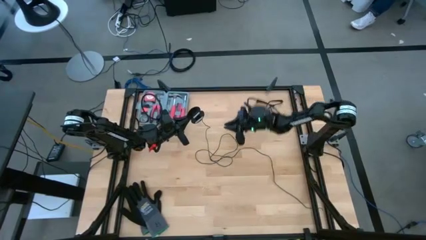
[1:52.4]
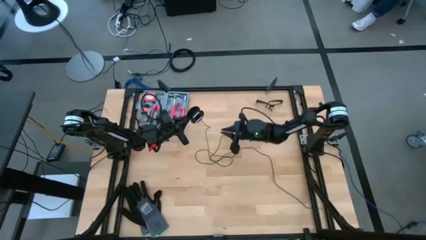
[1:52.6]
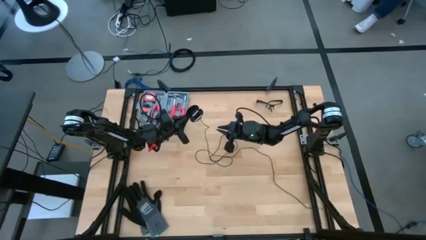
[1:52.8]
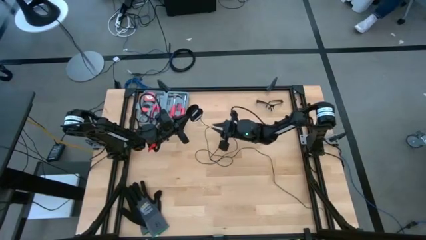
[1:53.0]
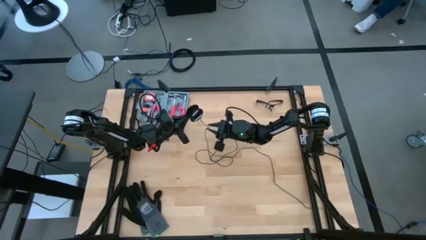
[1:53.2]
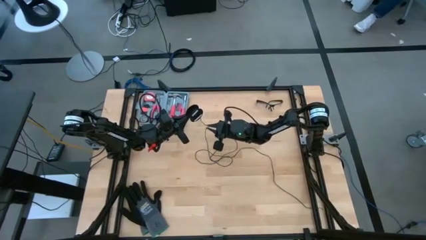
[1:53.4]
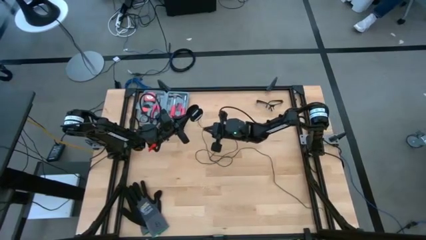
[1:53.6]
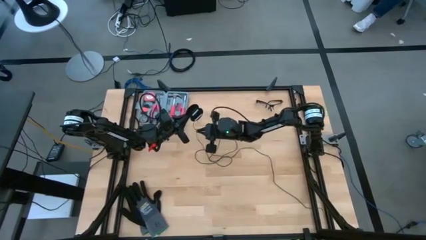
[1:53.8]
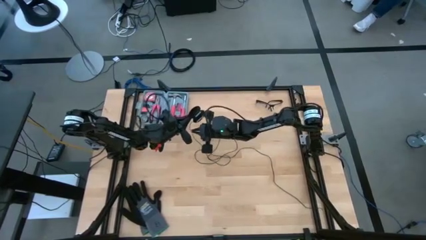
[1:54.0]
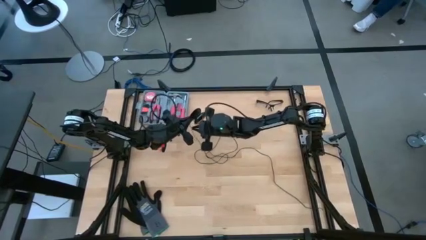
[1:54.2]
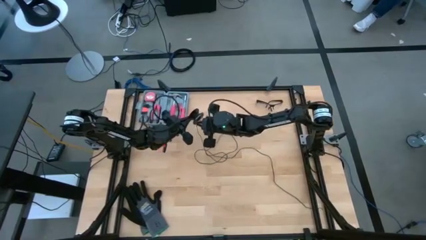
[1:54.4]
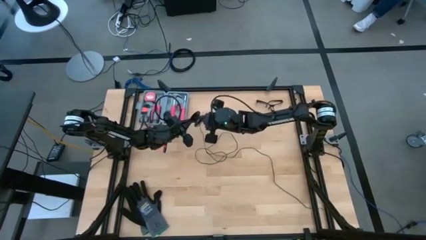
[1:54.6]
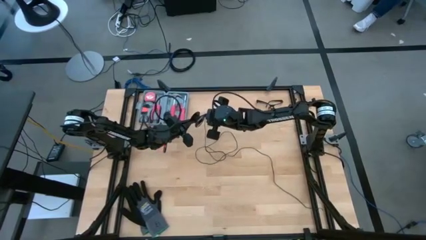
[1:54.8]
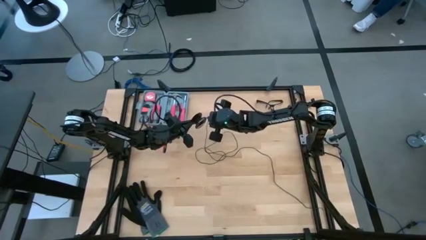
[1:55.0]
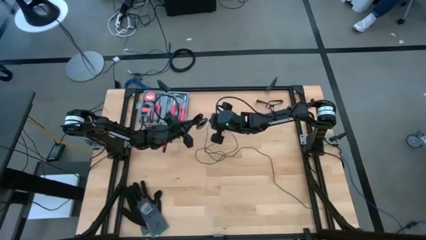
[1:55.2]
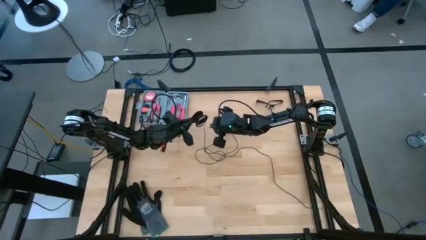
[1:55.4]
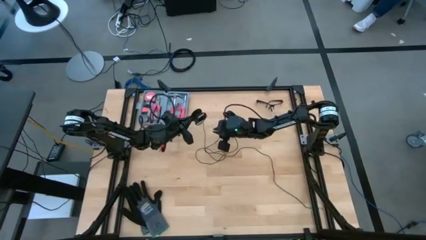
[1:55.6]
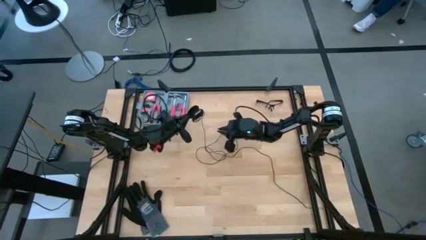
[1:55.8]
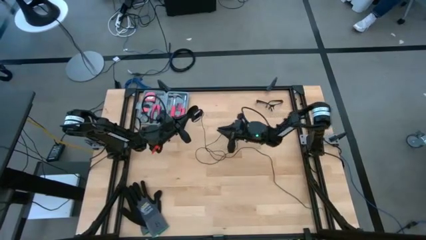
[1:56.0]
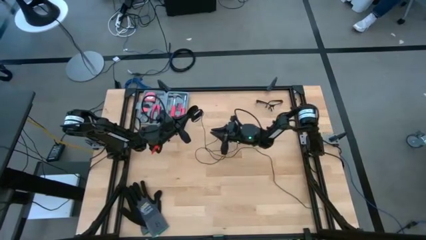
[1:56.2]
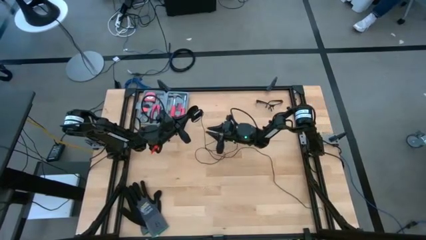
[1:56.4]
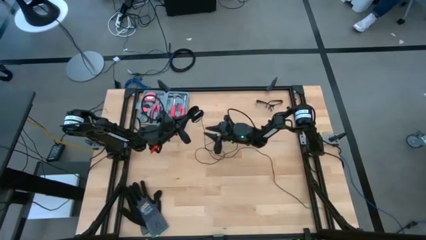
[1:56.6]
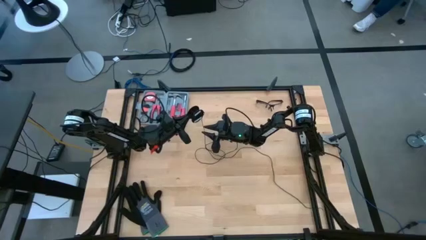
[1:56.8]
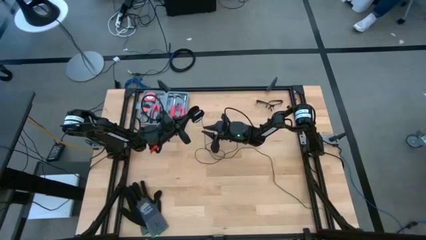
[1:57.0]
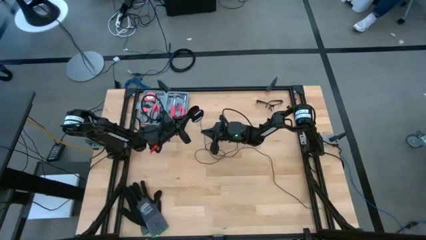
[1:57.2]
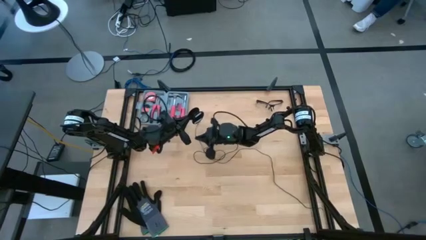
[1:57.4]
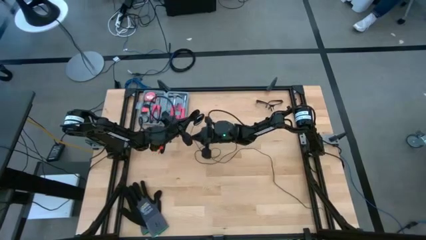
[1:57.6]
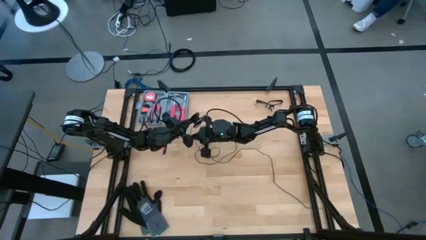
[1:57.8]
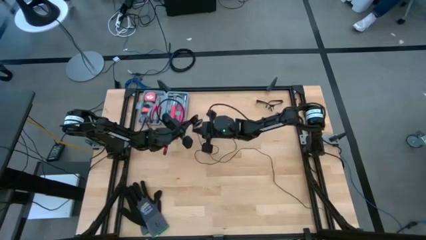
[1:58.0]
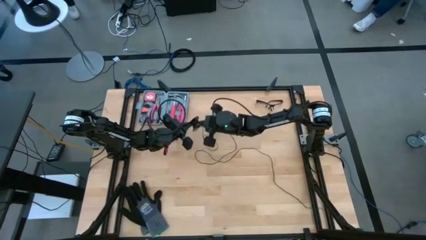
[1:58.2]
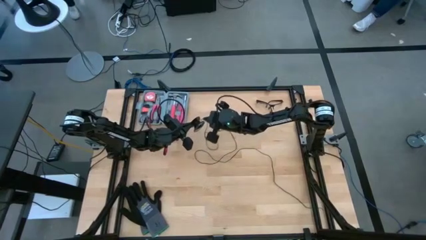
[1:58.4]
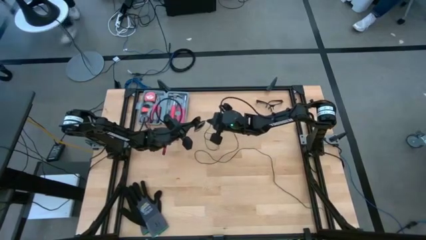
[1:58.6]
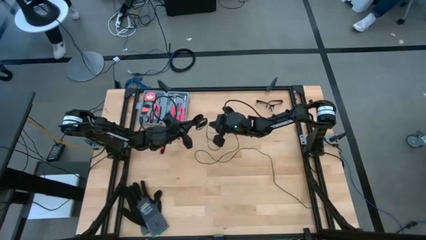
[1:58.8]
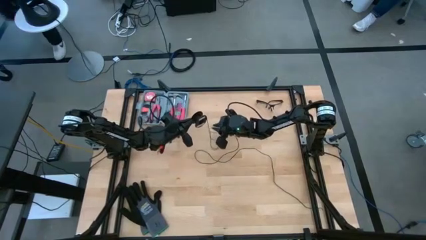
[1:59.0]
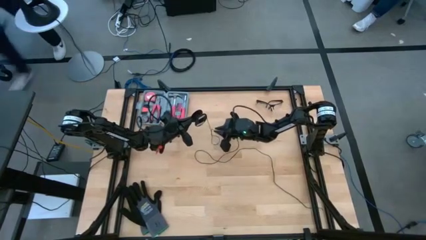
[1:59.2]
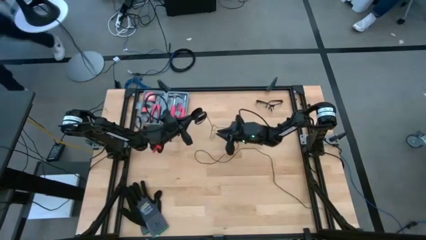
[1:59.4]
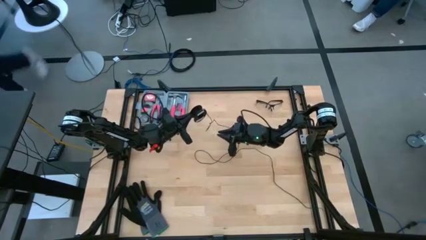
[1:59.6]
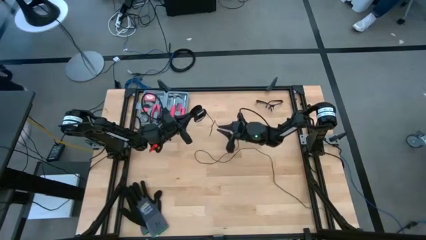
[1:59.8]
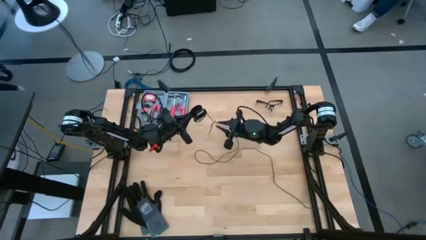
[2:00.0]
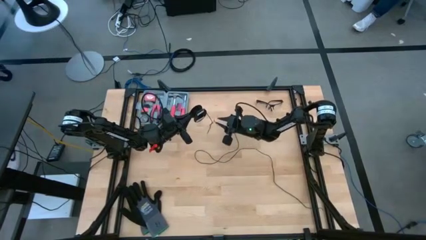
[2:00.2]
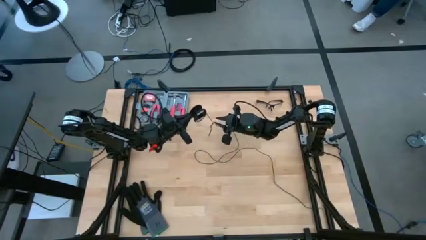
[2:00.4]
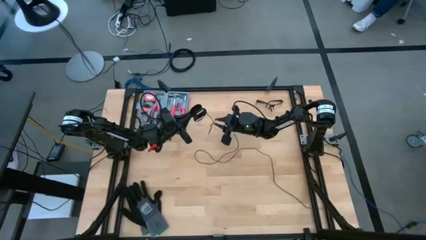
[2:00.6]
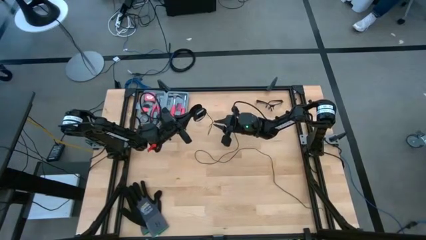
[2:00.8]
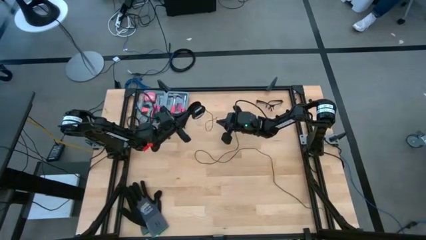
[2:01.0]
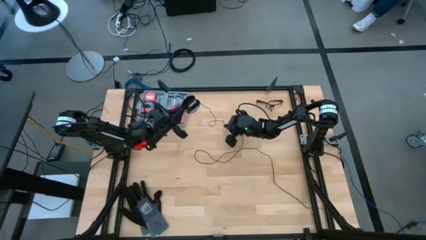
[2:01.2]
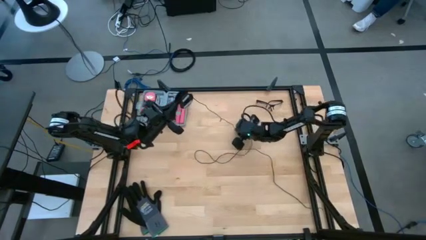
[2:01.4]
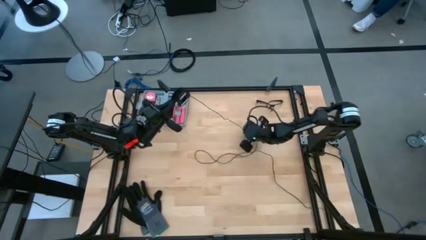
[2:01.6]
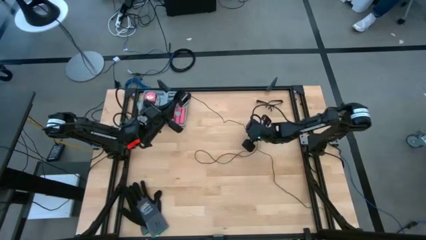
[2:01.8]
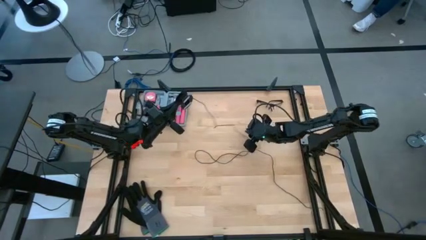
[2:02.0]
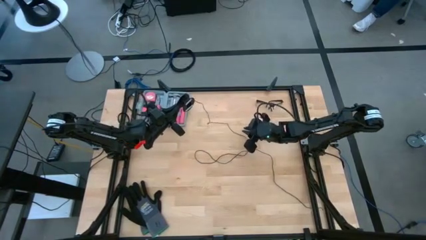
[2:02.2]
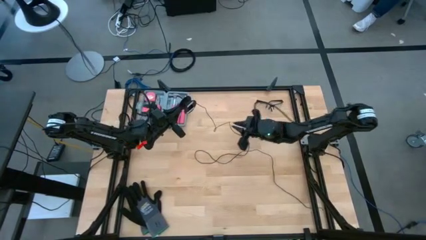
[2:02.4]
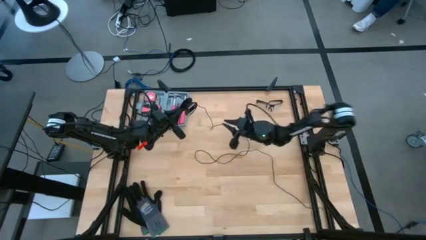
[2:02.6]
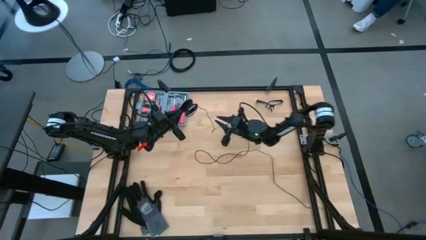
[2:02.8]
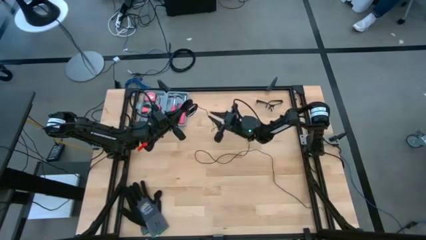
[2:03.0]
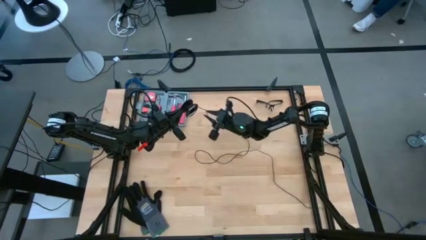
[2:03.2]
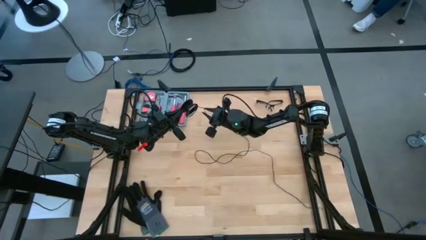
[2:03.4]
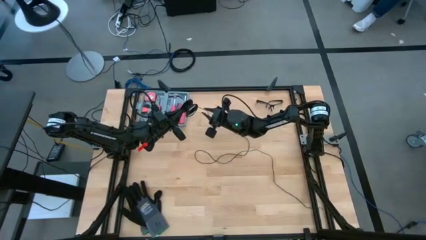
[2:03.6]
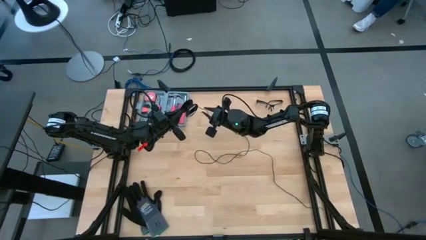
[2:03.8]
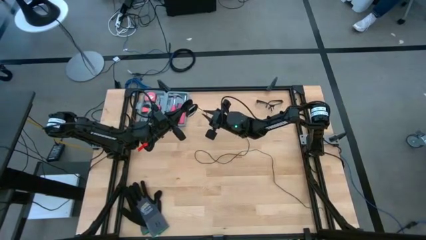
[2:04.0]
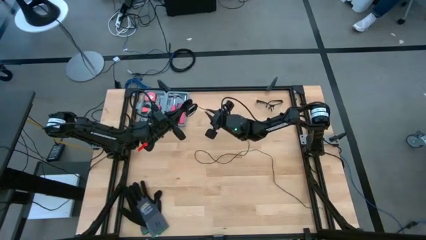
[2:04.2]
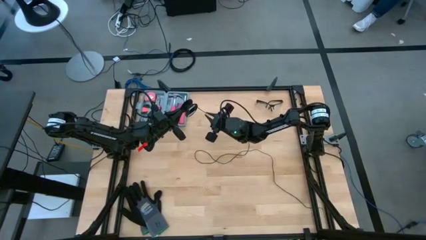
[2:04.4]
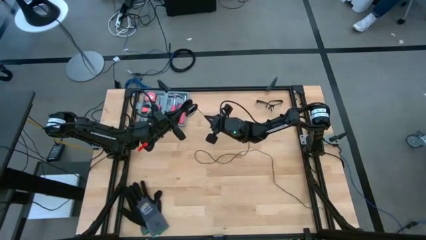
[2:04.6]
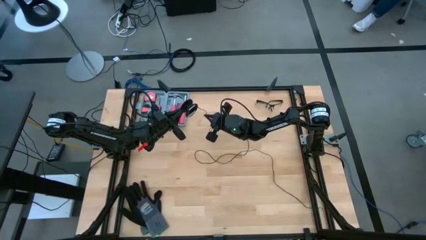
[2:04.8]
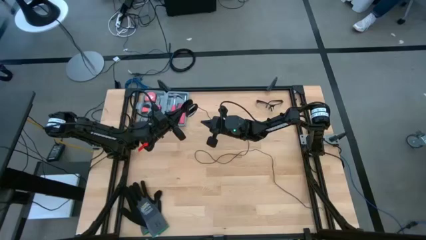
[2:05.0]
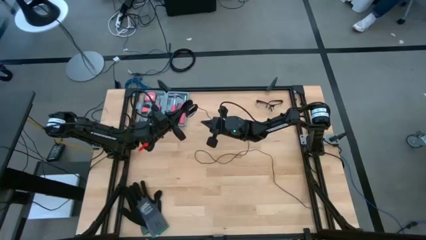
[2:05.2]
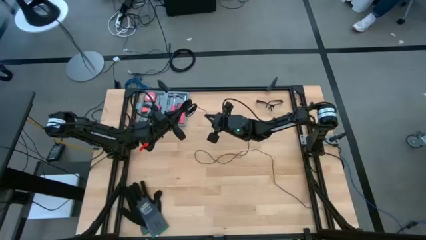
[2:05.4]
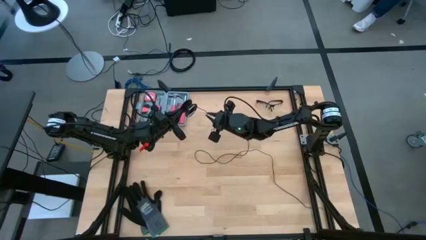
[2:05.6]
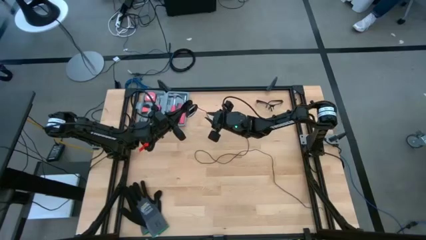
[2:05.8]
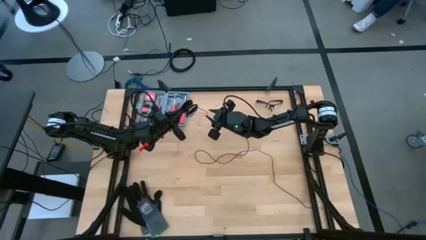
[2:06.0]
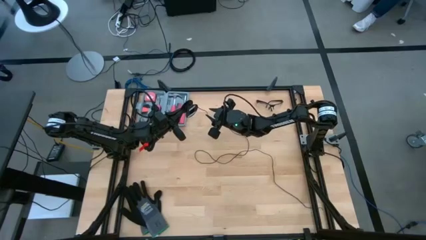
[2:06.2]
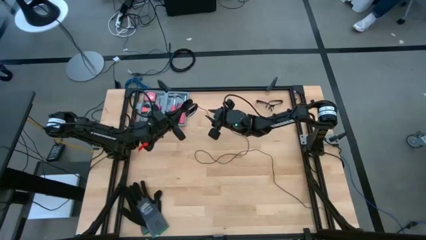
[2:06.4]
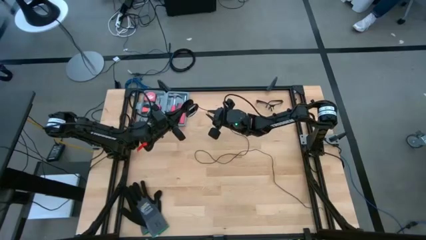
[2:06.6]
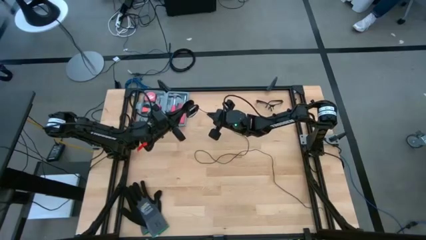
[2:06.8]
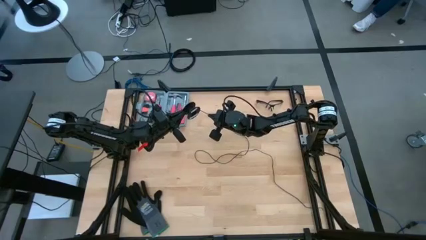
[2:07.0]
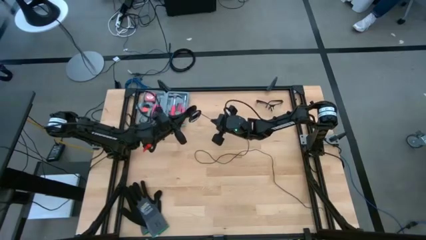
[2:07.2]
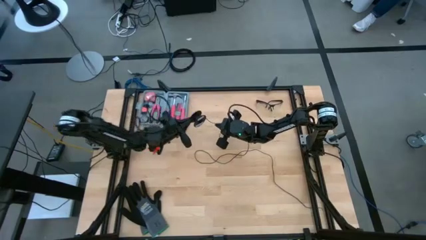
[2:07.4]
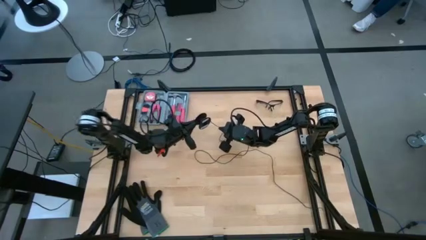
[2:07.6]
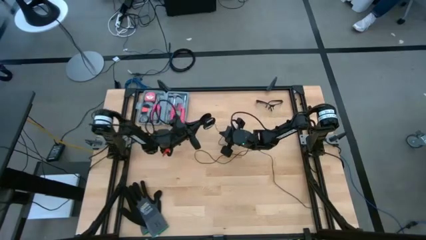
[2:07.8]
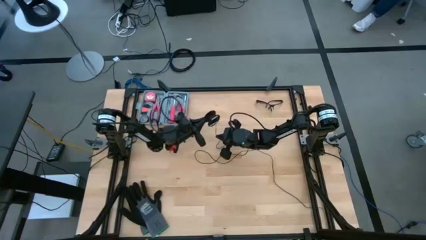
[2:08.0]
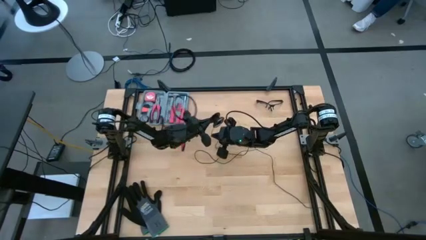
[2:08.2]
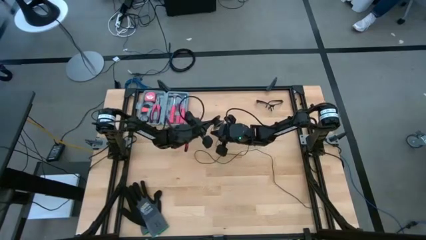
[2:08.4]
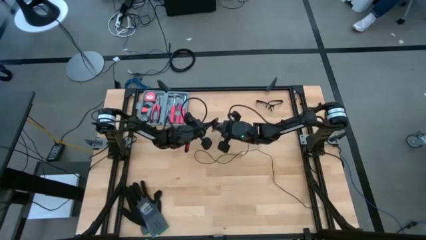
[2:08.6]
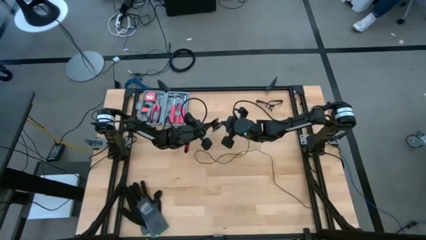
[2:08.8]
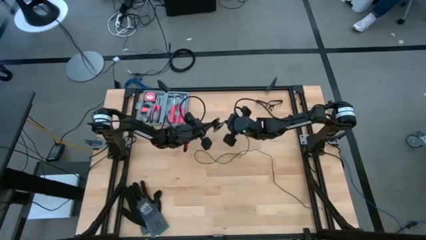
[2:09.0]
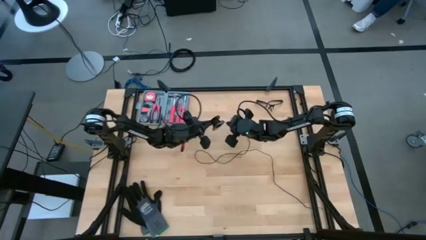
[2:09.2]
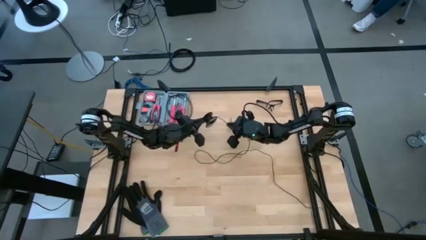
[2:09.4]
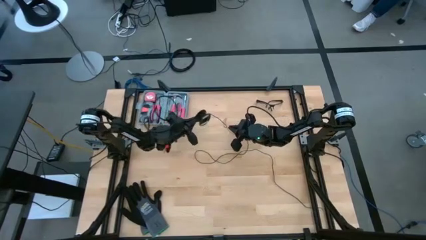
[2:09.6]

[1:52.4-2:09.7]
Task: Coil cords
Coil the black wire on the black spool
